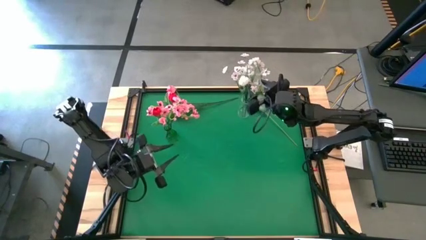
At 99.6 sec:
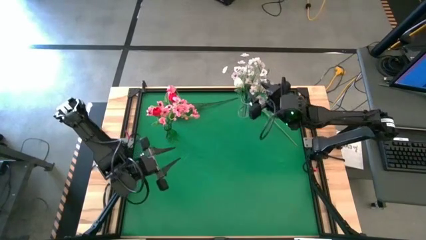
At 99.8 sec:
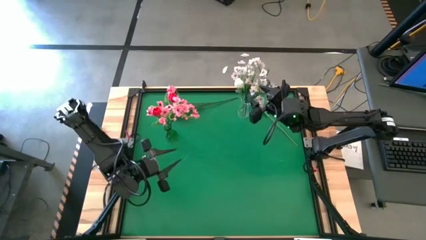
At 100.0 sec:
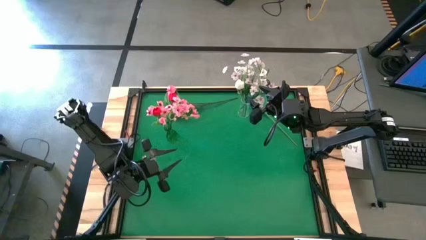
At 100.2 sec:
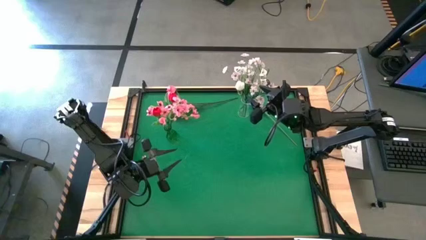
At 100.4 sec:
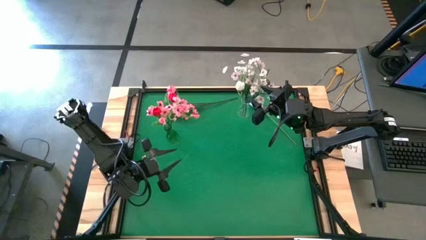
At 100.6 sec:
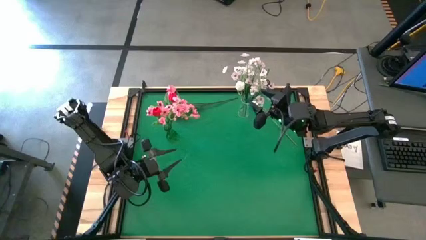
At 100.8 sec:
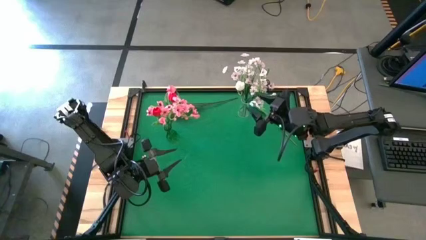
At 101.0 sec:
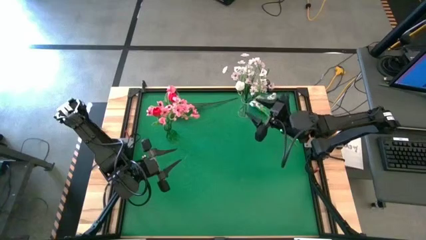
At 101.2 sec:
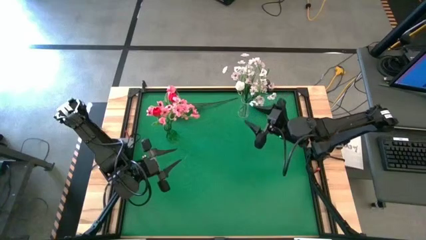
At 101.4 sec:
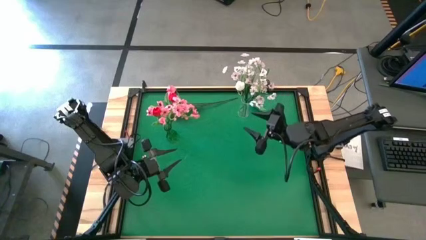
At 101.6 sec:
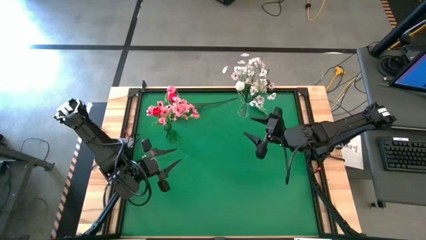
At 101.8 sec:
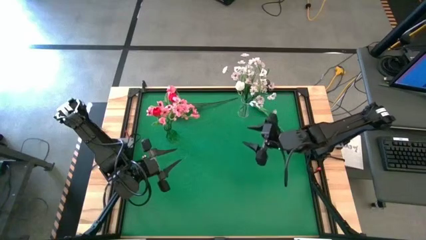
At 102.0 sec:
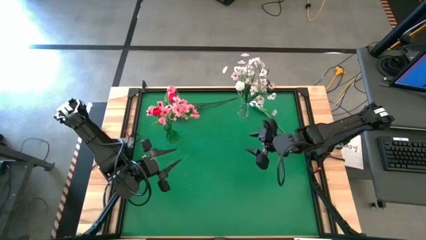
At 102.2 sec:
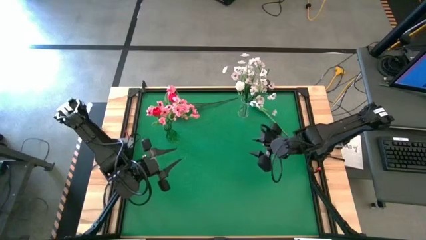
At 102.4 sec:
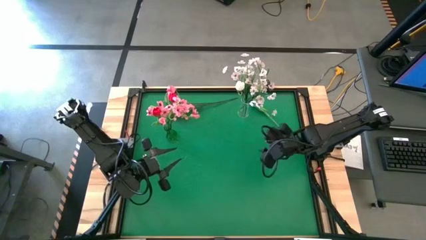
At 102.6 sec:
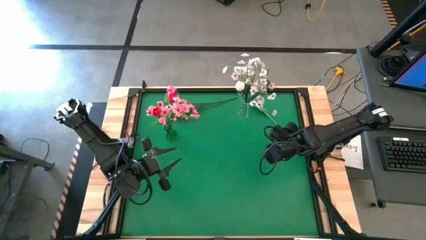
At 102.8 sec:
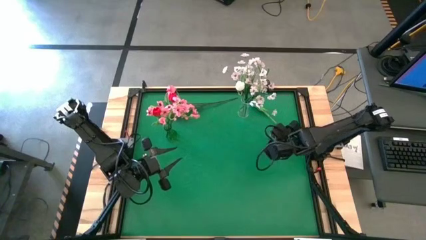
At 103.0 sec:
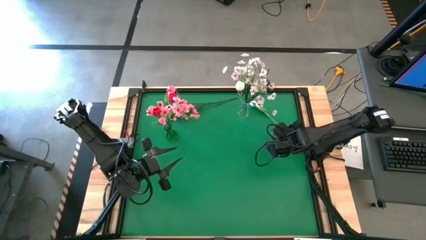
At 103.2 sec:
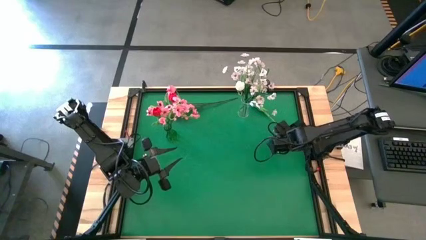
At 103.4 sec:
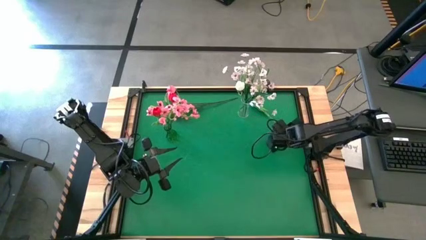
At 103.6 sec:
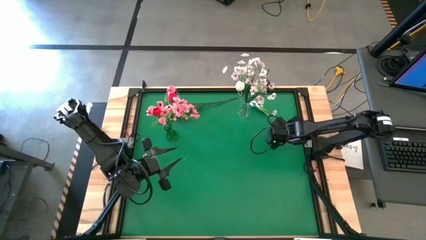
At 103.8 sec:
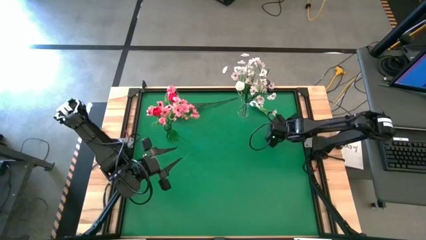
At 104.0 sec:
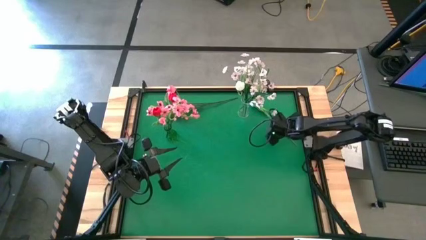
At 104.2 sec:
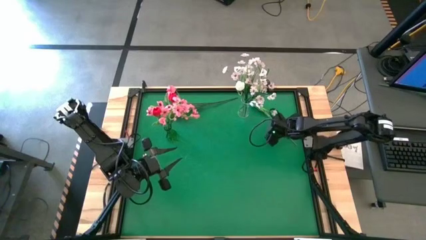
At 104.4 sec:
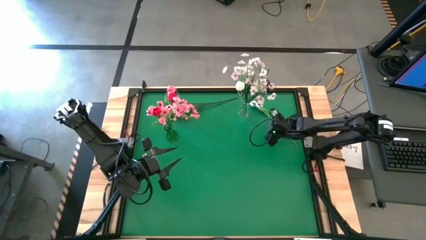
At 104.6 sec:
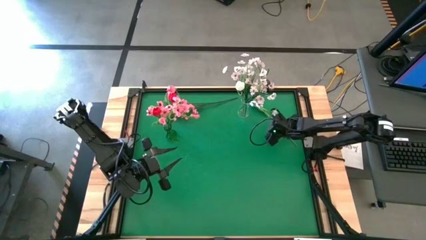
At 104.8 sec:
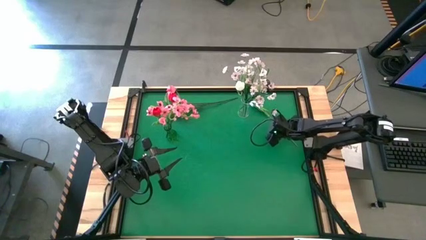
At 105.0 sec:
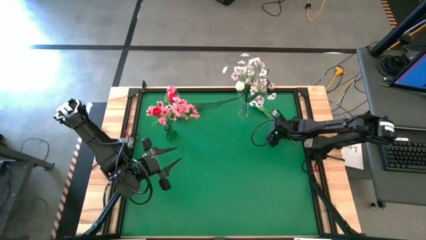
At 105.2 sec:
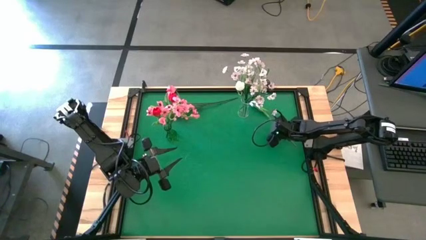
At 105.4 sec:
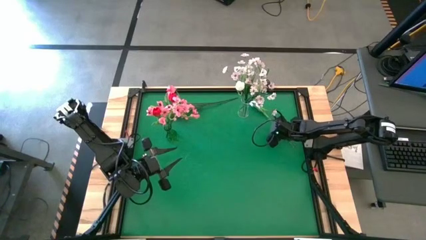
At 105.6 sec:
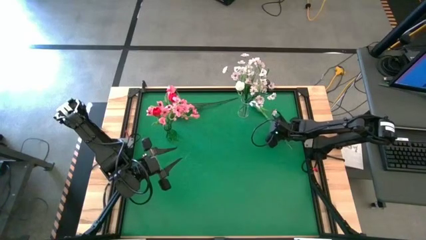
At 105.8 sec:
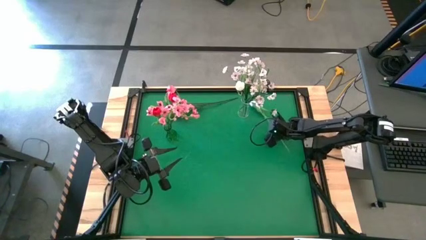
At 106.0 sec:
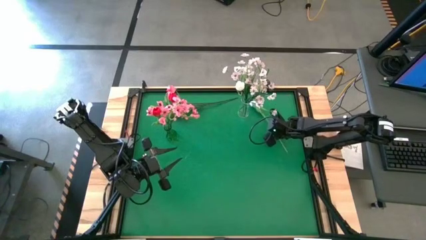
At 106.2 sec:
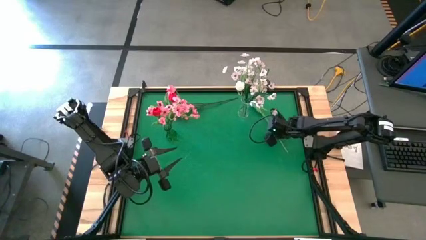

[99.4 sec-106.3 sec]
Task: Sort flowers into vase by color
Put the white flower into the transparent vase

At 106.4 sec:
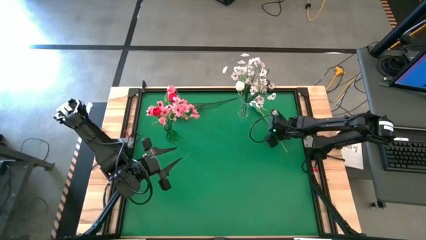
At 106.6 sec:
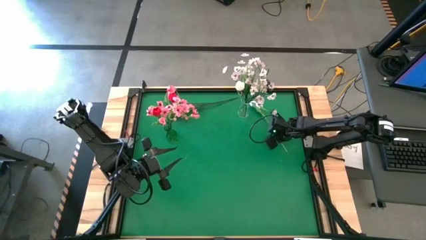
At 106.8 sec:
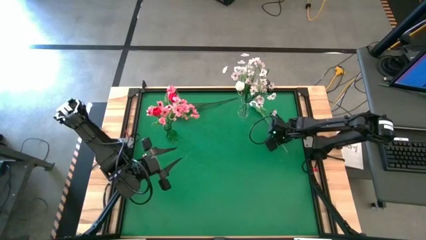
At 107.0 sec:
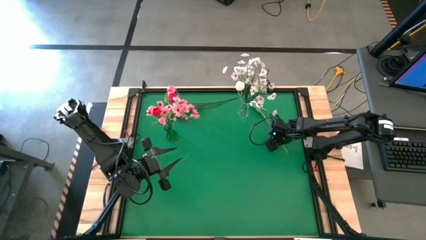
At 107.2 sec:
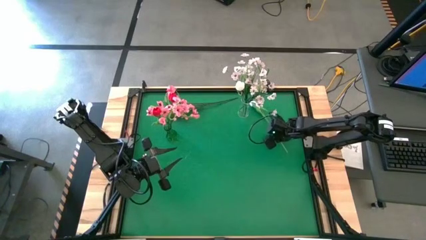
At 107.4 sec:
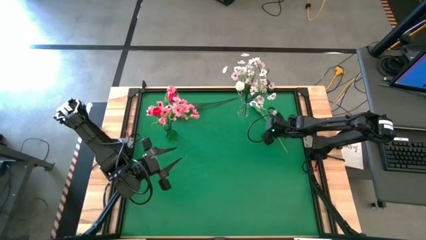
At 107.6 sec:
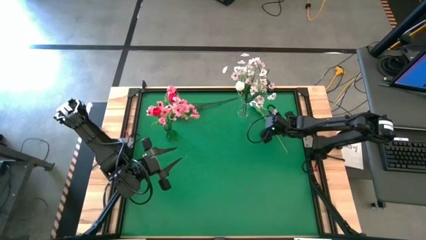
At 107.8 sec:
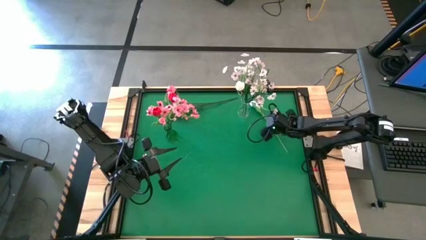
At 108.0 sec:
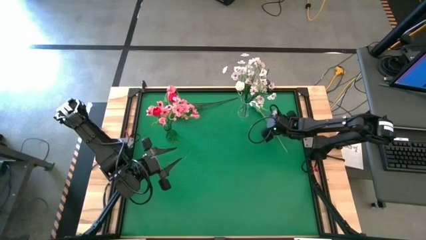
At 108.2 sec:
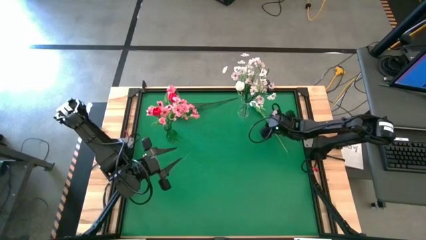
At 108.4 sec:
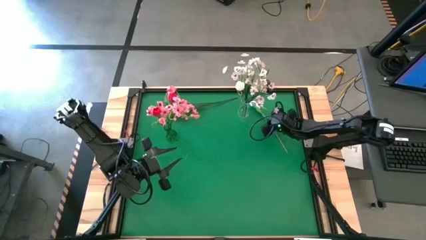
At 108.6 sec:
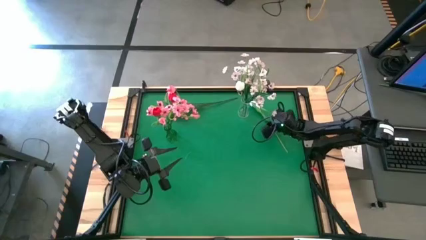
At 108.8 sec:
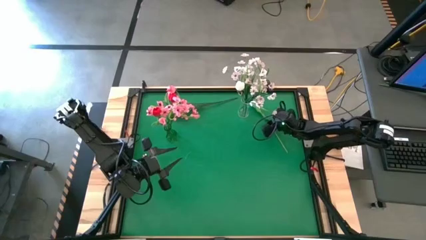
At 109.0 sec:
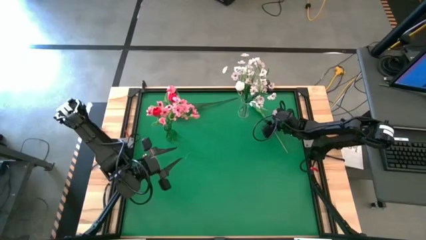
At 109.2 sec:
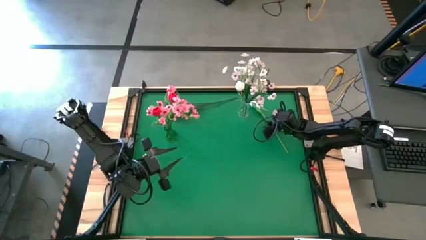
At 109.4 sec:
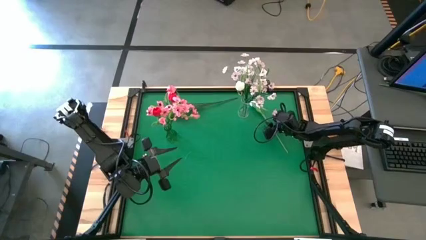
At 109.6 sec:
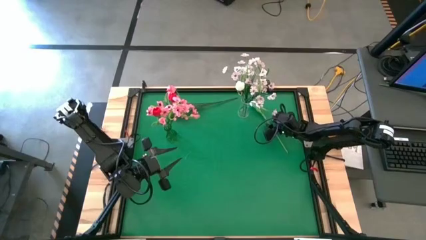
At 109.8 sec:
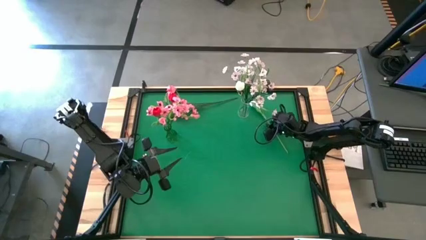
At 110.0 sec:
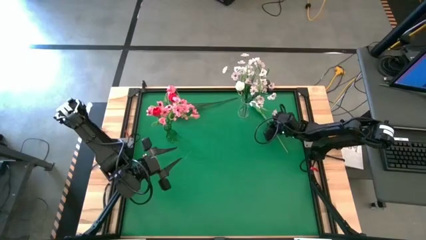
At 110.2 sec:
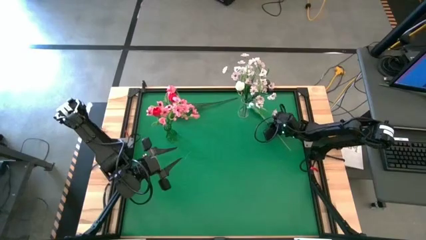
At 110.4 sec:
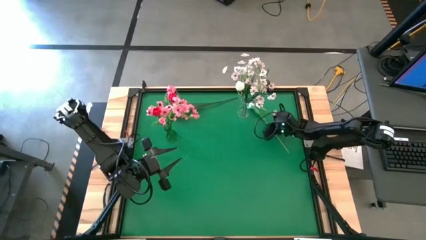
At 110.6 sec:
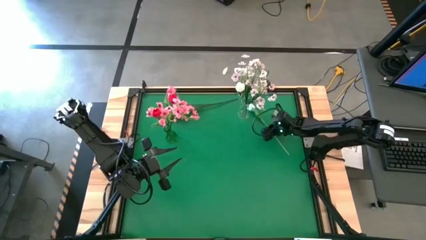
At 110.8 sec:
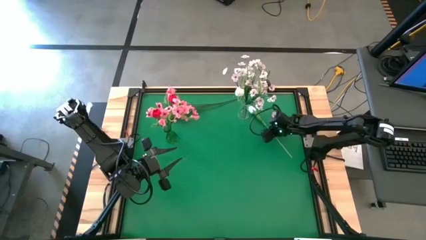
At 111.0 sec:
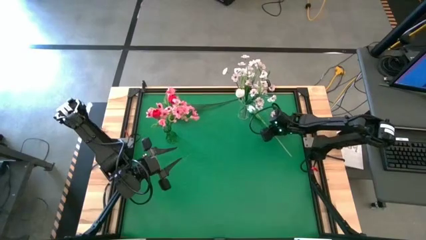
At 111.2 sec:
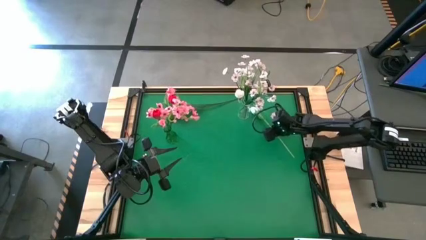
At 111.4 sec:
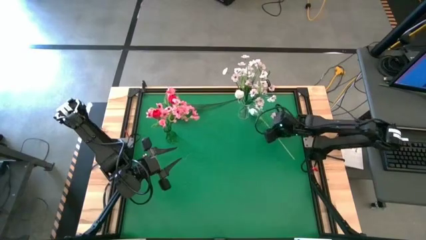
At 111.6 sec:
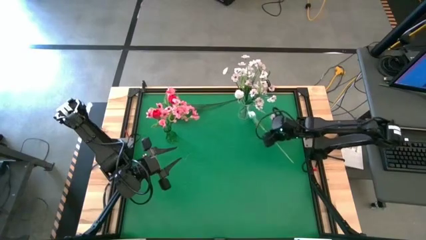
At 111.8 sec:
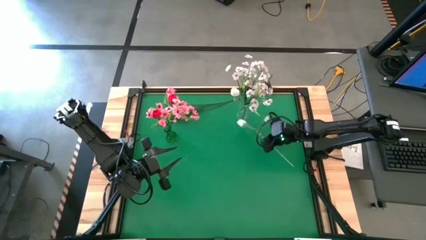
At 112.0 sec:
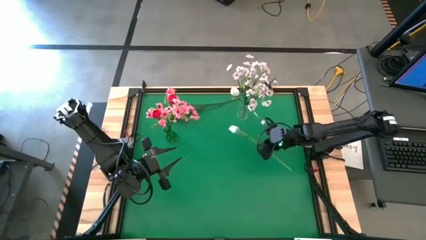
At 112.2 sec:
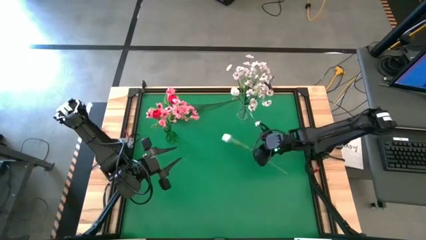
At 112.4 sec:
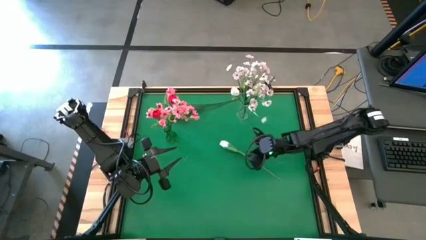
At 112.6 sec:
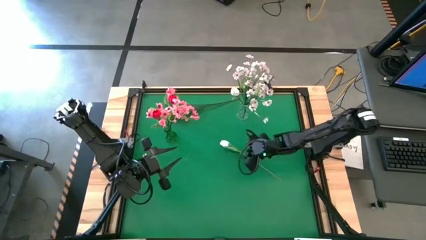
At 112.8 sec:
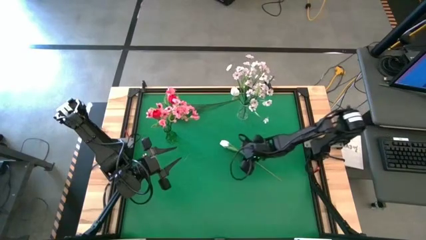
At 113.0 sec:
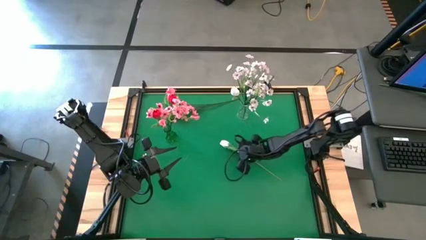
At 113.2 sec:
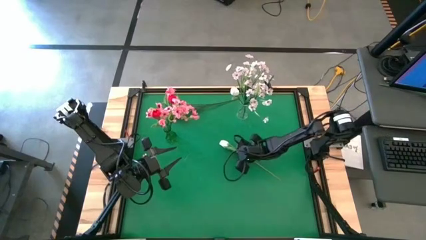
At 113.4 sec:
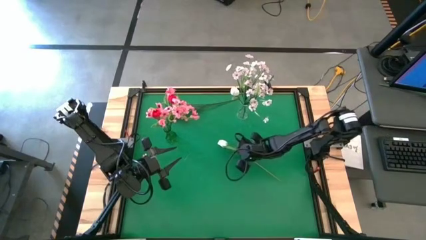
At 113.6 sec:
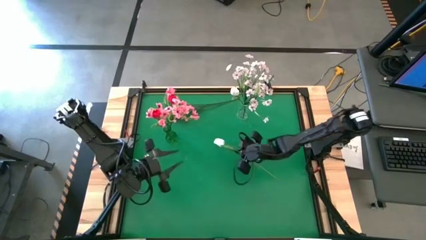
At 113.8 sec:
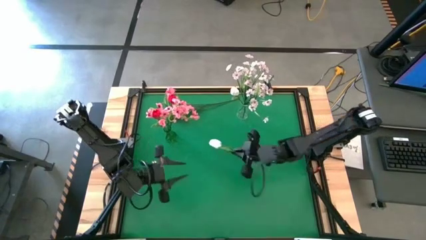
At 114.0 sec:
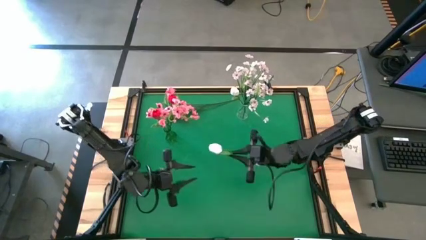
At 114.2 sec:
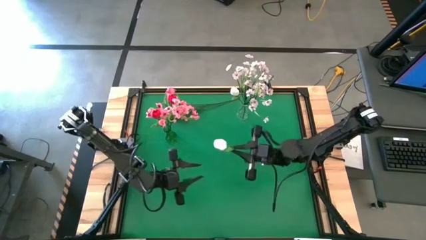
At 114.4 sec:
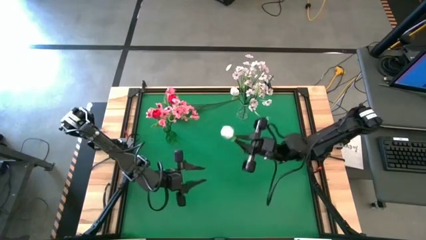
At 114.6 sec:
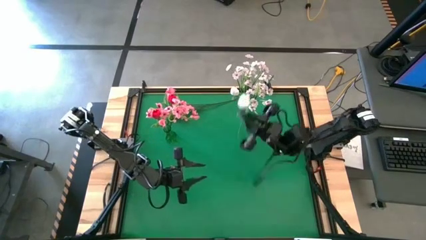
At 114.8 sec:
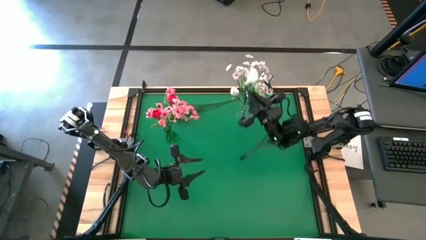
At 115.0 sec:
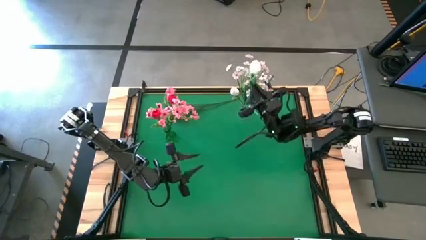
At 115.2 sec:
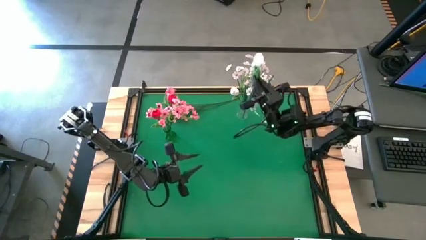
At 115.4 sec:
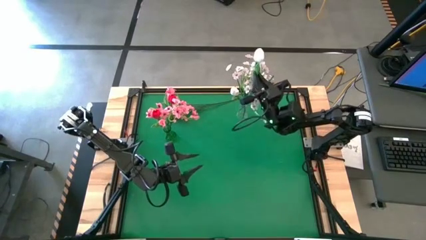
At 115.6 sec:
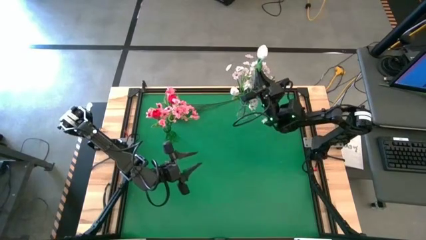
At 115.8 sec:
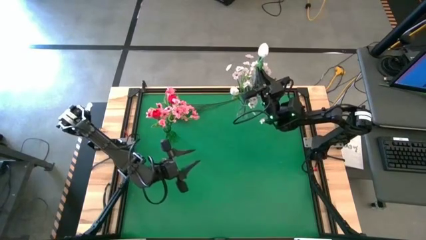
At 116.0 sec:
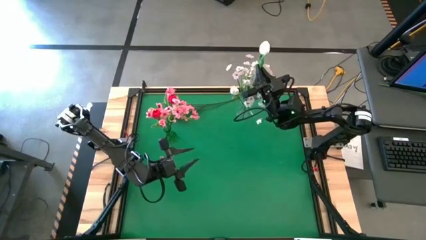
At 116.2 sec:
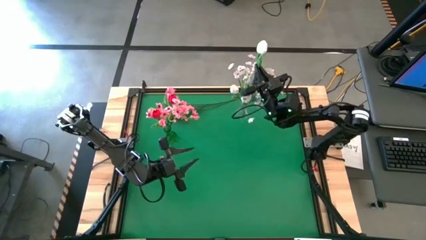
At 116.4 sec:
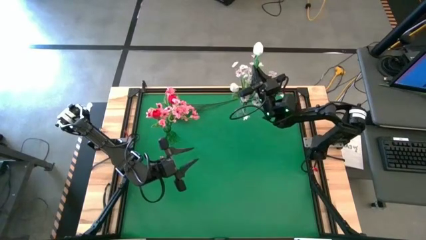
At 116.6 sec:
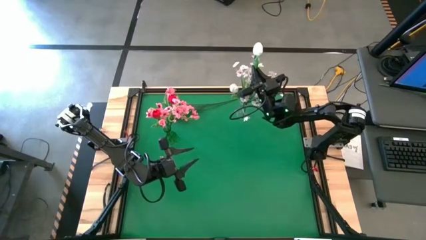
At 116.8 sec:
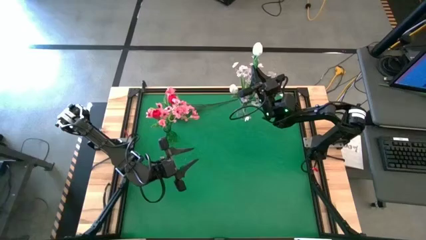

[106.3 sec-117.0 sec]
Put the white flower into the transparent vase
